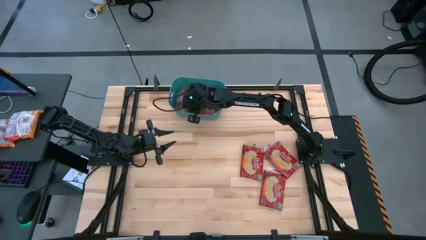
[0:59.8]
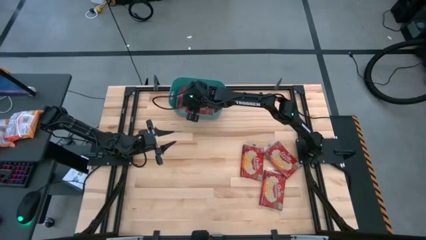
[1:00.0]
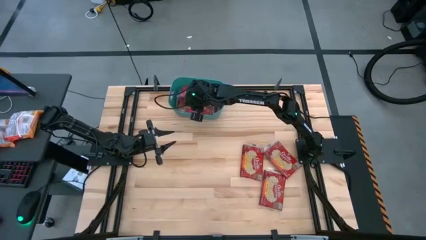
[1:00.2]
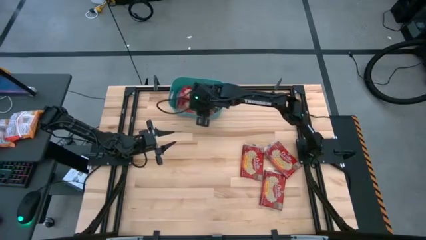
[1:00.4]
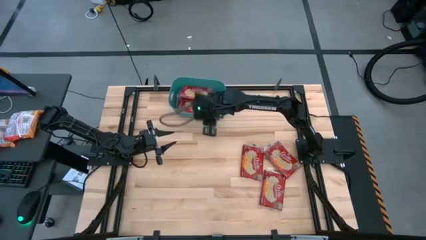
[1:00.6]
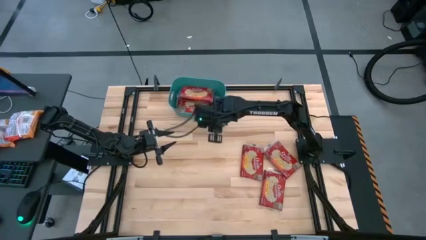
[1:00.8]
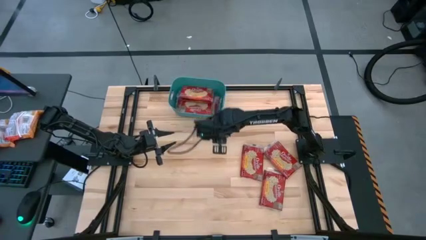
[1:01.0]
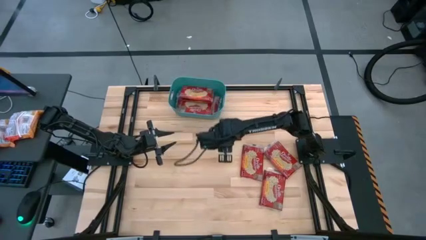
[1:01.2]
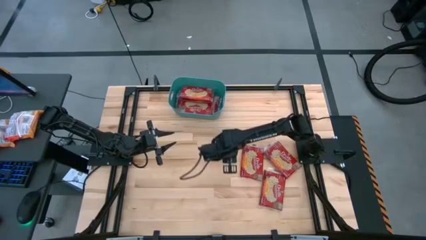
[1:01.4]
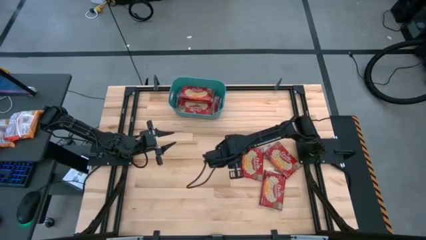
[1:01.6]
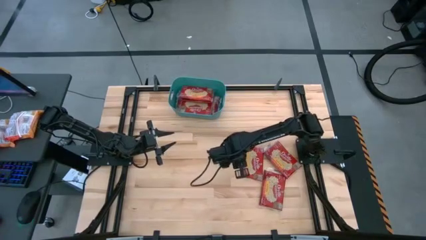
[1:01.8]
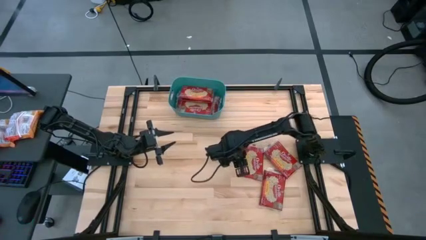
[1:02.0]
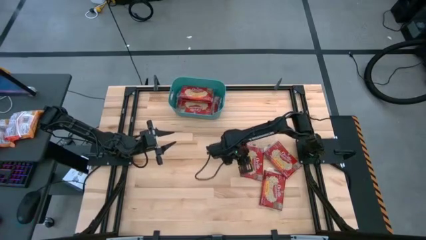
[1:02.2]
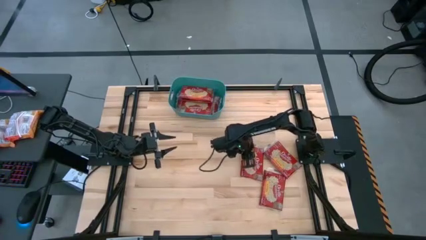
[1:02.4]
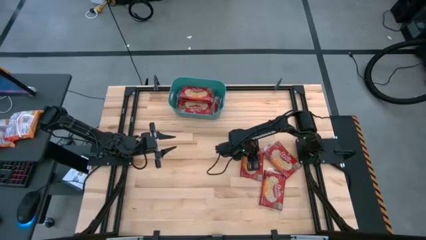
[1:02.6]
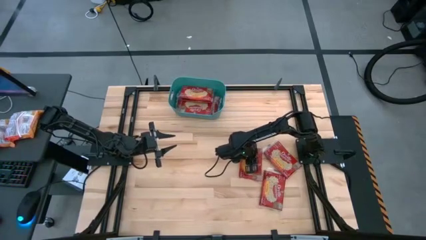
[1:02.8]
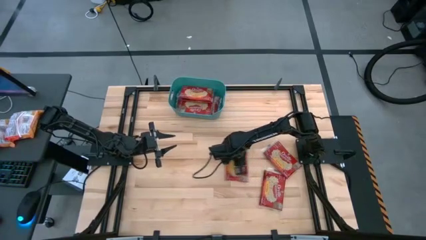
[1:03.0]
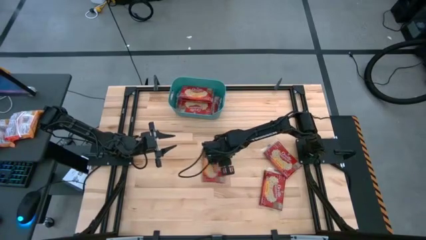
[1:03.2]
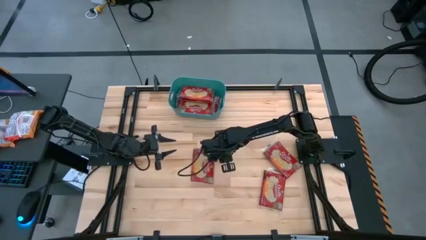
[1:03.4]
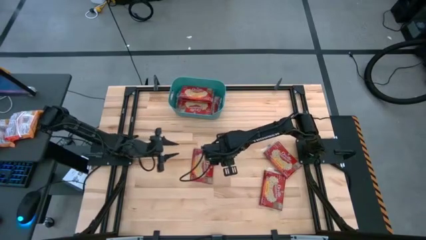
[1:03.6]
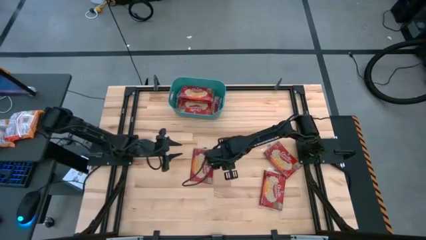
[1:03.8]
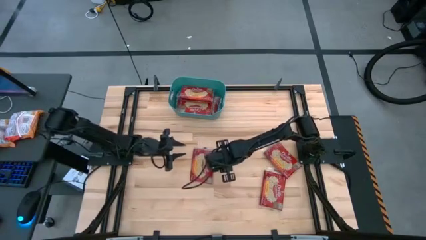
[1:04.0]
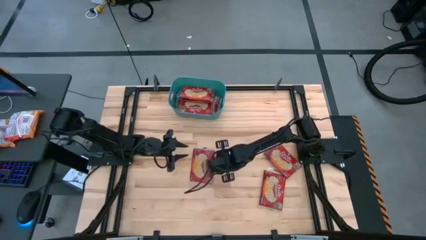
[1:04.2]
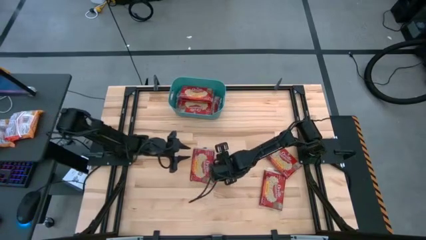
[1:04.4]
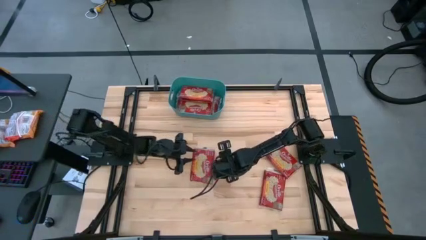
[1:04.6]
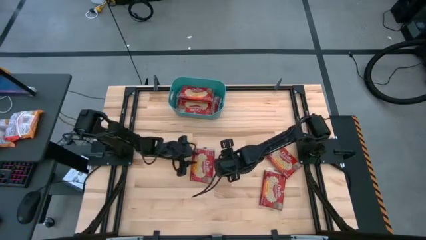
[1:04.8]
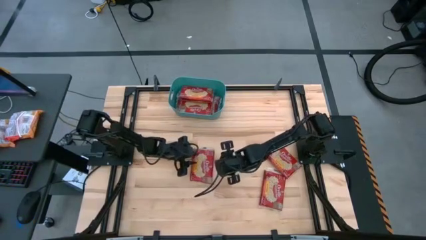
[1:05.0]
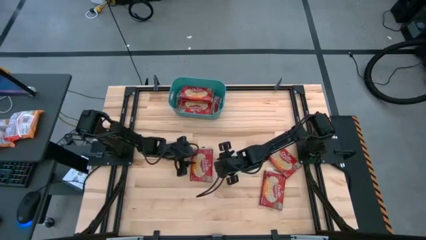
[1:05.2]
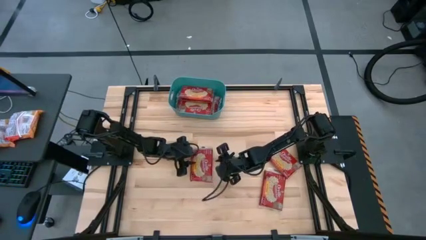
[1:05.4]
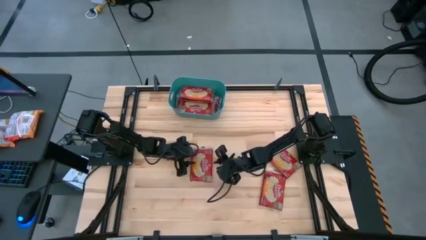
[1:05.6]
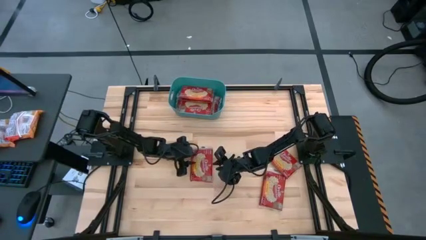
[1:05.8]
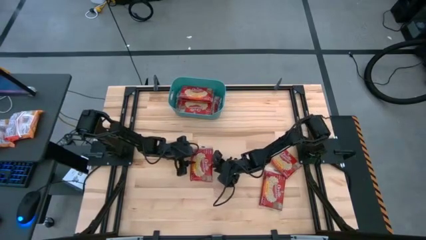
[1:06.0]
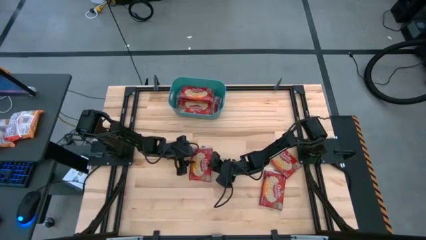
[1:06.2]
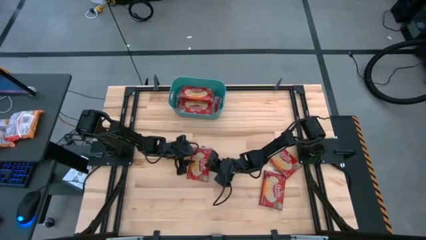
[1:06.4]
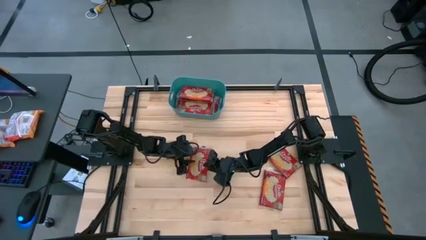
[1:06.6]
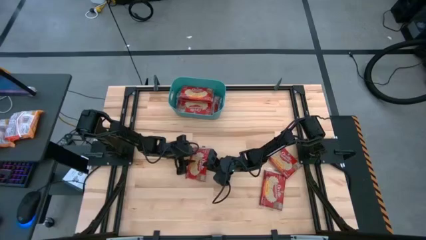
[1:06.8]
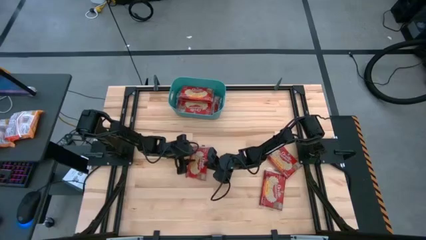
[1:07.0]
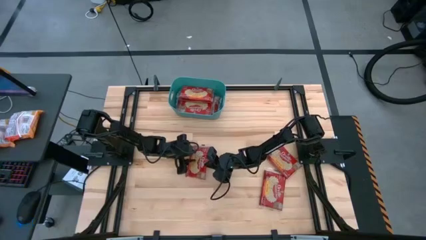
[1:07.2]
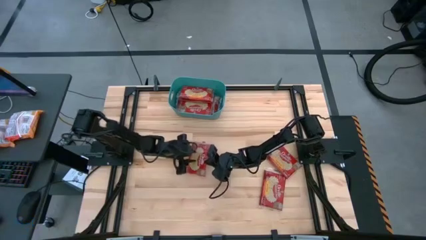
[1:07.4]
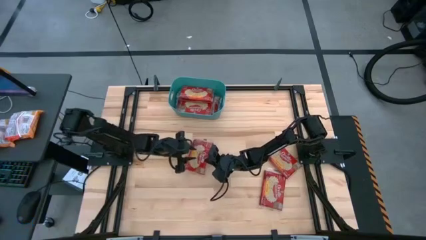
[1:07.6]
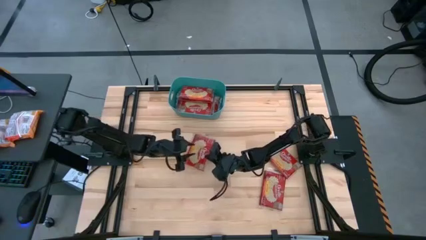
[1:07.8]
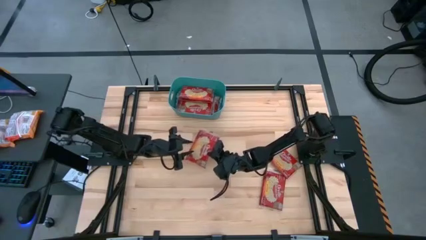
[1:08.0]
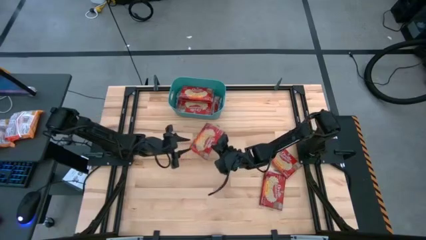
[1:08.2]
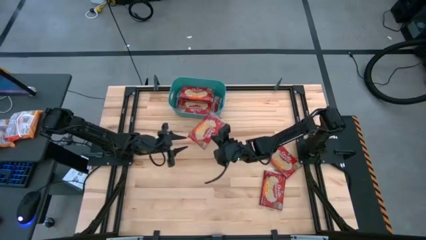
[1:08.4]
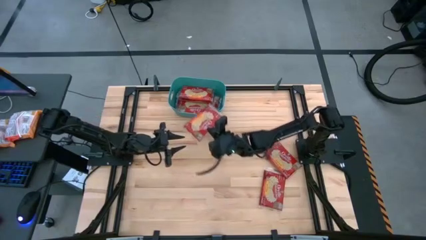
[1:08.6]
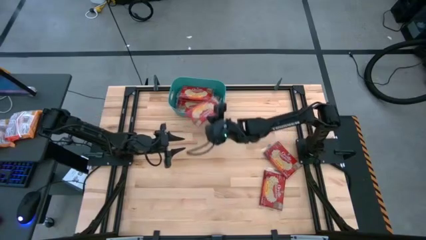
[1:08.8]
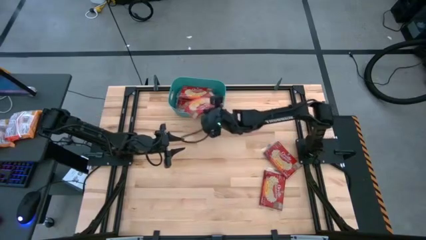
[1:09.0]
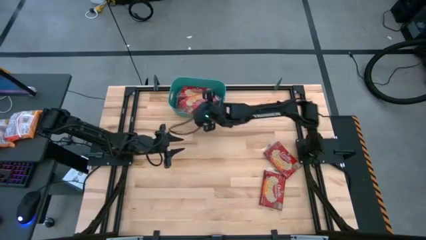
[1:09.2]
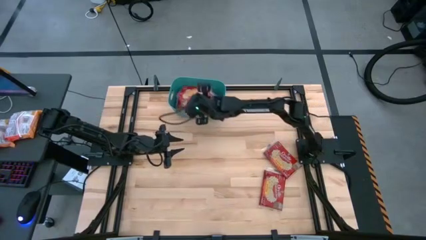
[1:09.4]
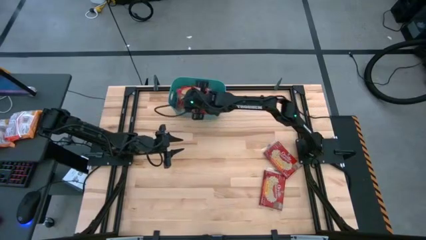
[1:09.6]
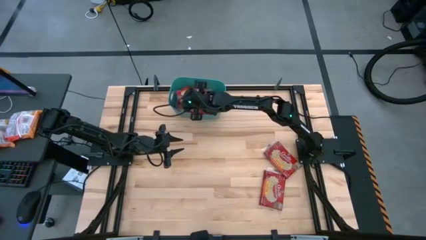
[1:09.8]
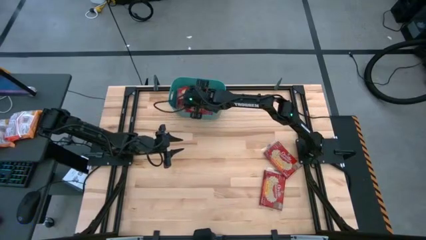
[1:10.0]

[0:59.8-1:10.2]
Task: Sort popcorn bags into baskets
Put the red popcorn bag into the green bin

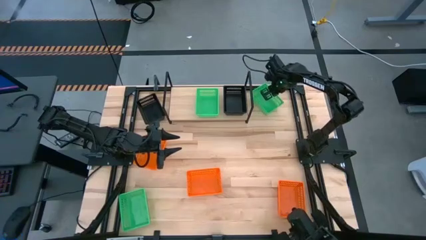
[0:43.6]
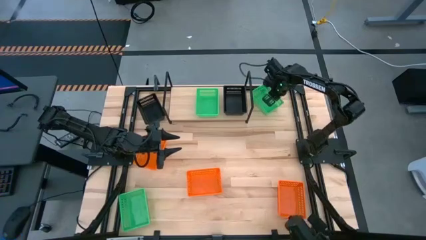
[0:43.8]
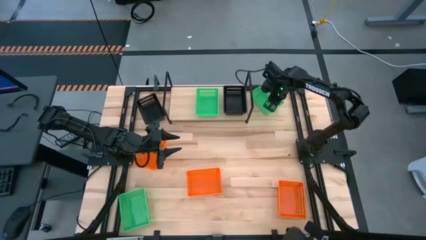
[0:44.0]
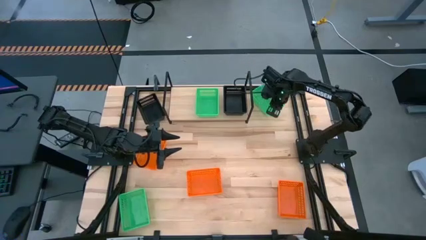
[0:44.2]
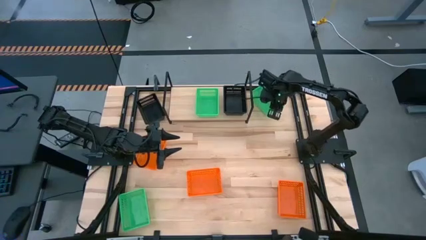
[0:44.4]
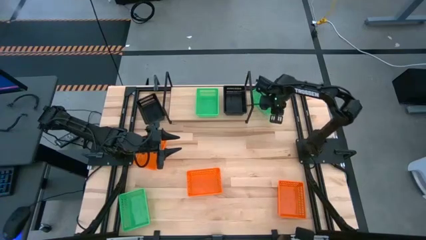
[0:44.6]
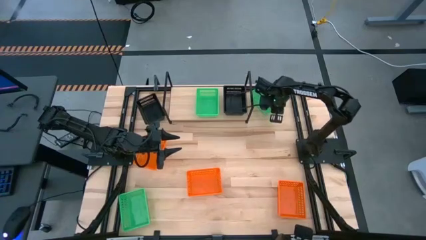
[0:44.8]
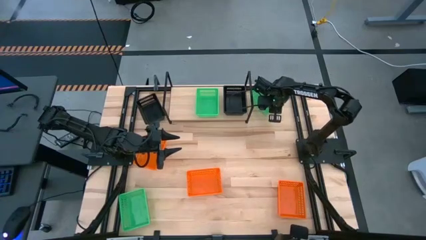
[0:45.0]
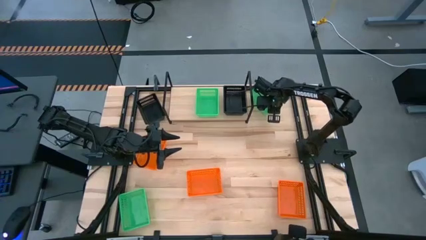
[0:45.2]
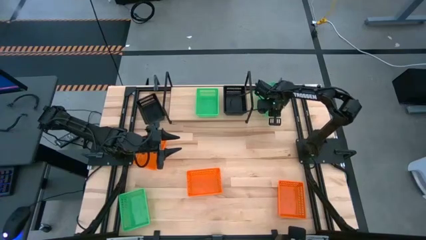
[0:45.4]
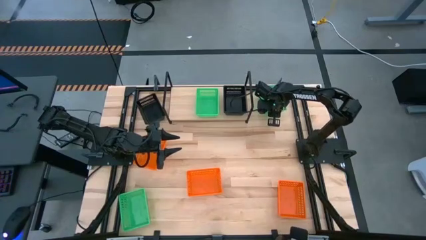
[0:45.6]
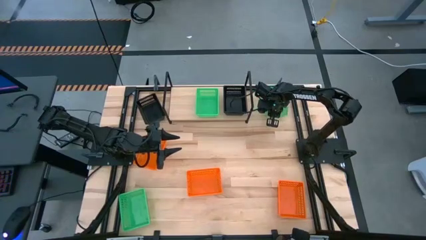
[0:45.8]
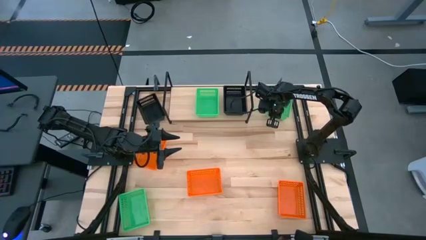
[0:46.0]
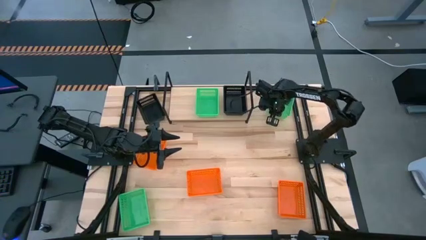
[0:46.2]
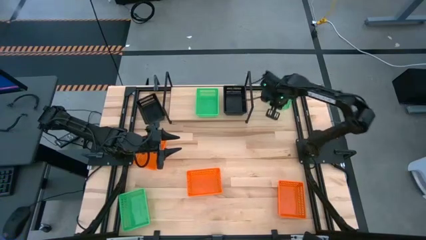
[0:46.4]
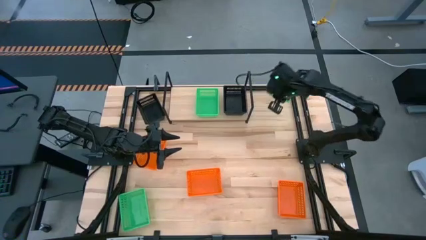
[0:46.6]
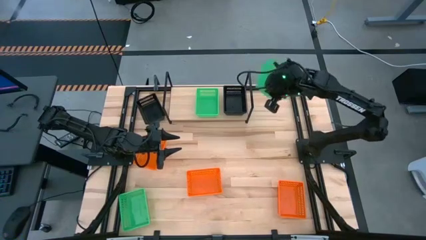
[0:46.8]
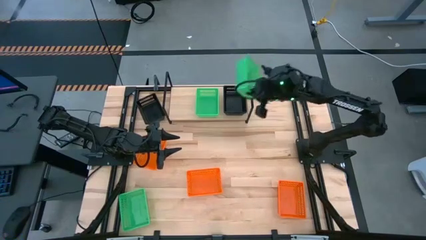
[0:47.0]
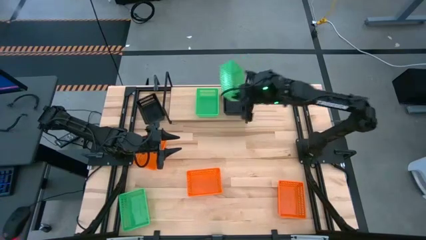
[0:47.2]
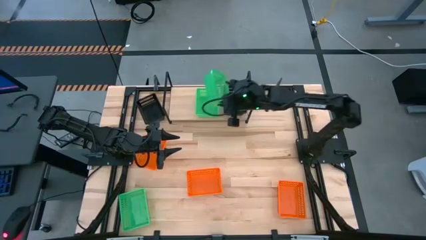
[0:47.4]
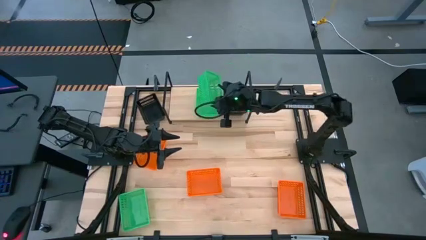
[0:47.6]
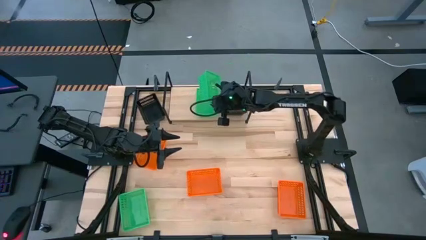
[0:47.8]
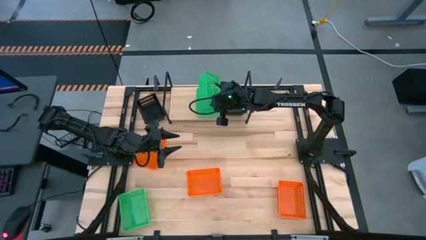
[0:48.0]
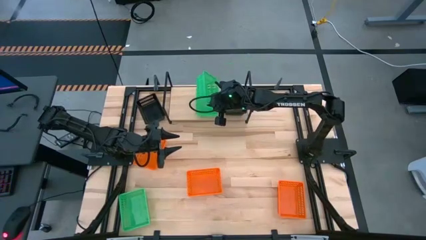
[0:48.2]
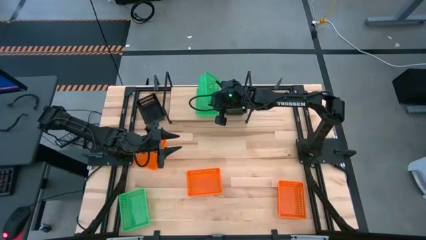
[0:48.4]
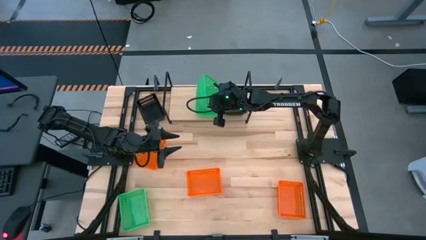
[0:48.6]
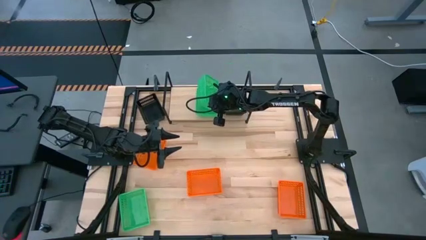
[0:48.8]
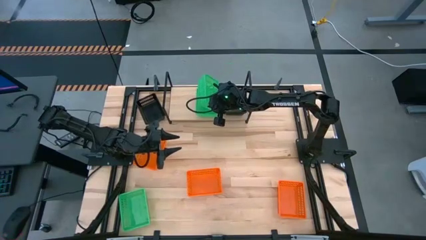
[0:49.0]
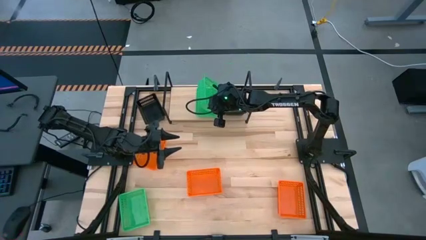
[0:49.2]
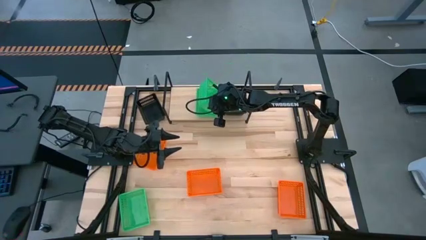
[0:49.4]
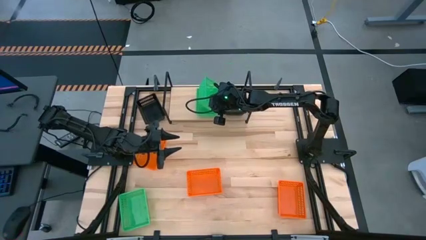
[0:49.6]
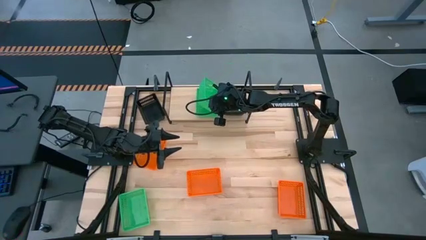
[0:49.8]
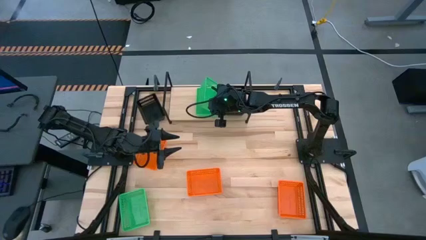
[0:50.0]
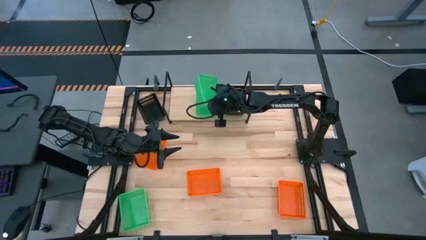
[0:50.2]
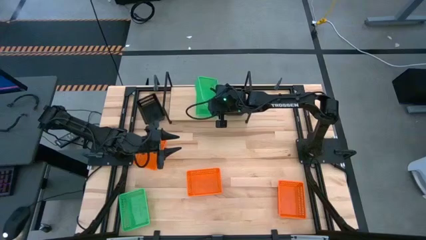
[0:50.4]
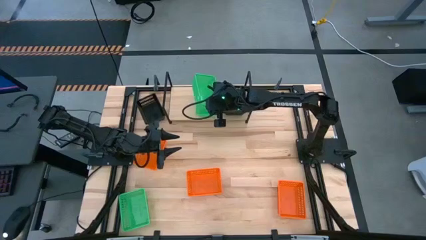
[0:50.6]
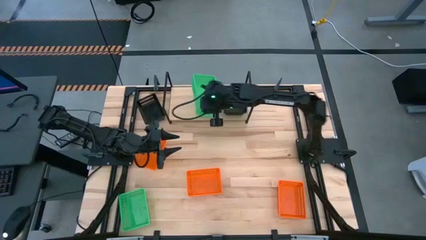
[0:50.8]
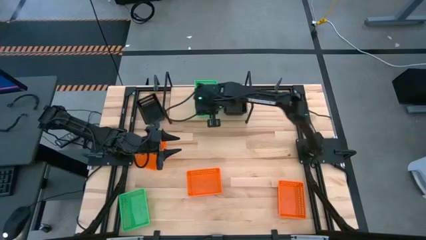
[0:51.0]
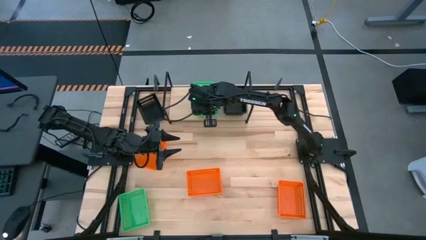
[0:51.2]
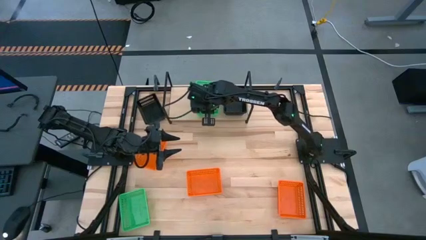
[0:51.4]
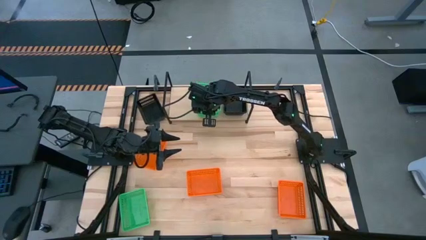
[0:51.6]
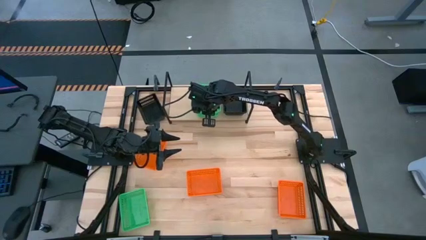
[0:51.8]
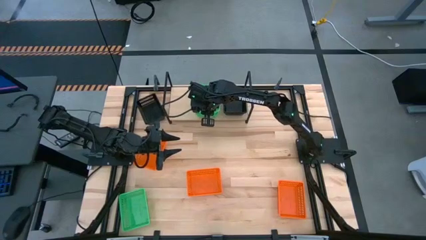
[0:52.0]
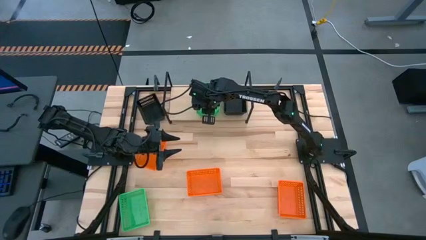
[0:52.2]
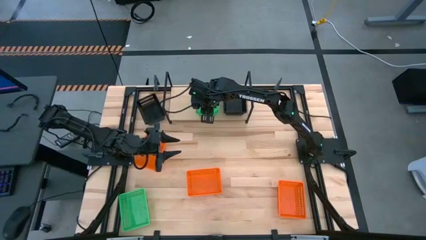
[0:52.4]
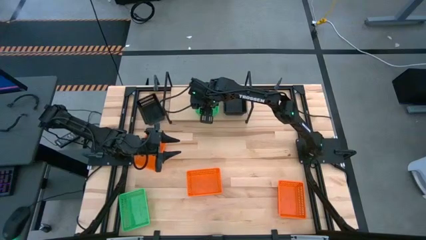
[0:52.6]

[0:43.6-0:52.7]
Task: Stack baskets on shelf by color
Stack the top green bin on top of the green bin on the shelf
